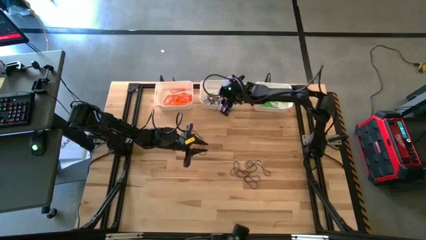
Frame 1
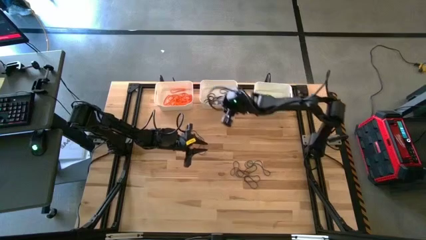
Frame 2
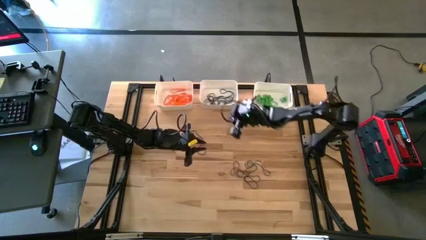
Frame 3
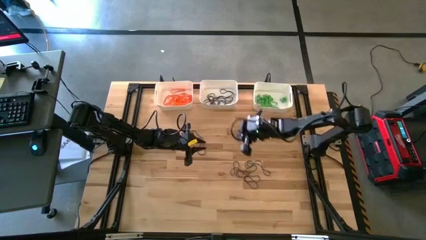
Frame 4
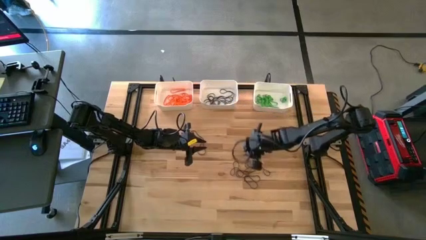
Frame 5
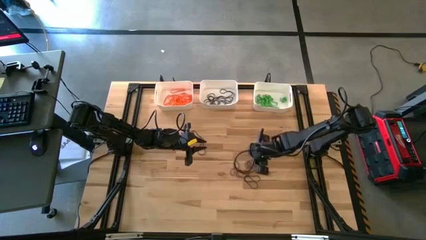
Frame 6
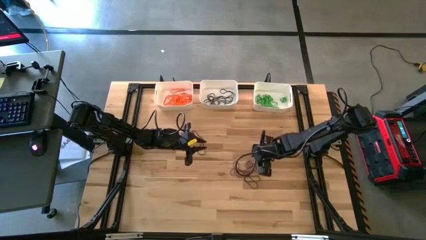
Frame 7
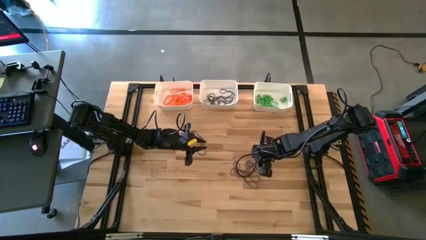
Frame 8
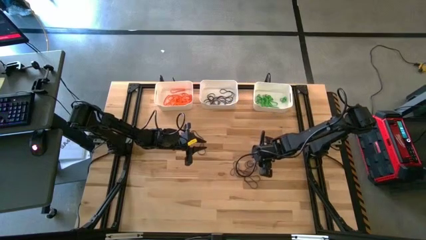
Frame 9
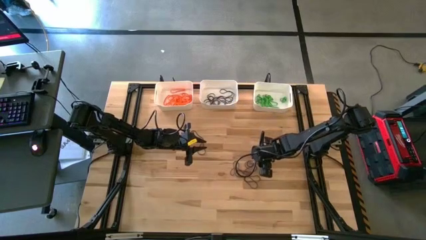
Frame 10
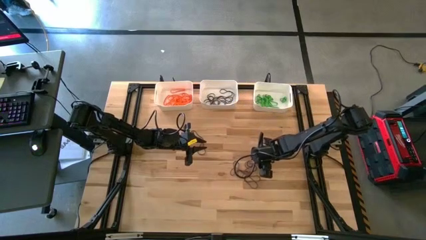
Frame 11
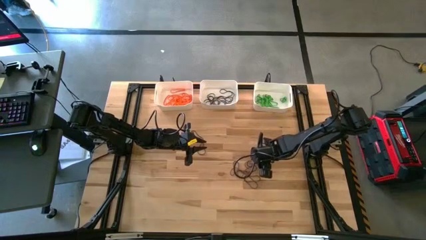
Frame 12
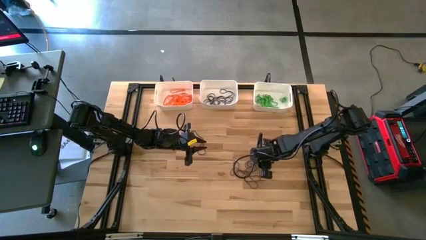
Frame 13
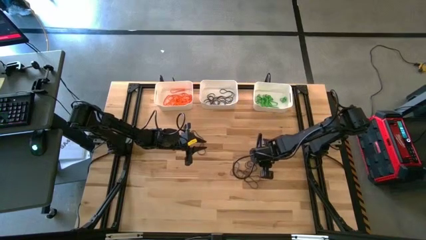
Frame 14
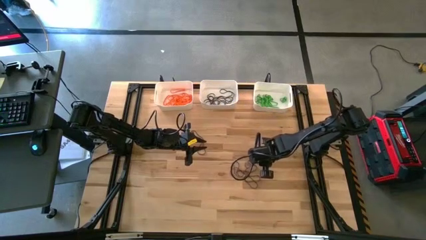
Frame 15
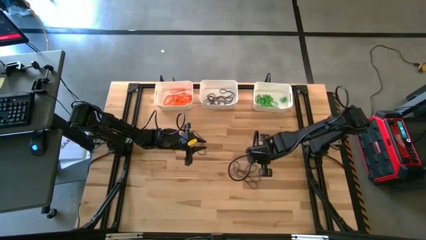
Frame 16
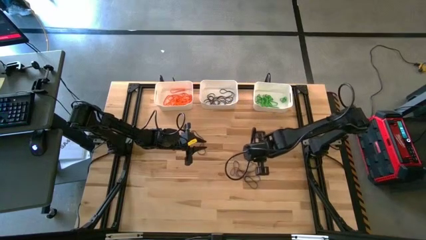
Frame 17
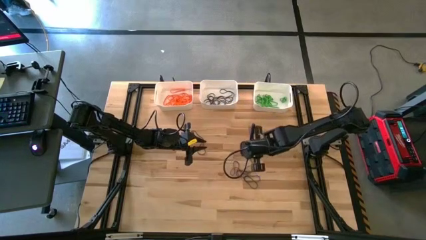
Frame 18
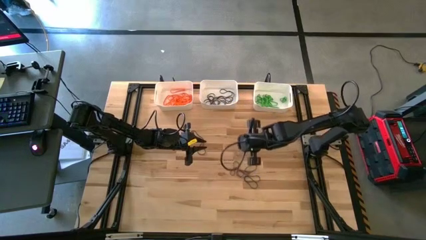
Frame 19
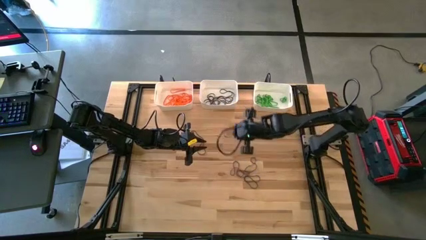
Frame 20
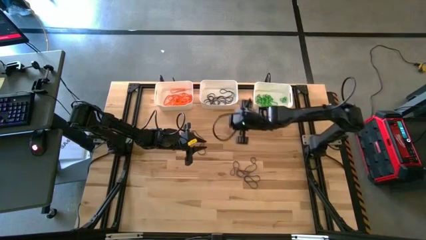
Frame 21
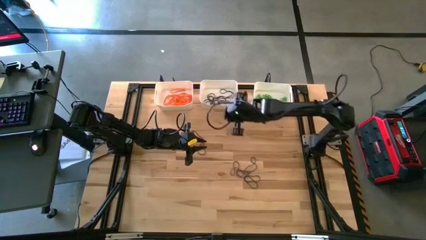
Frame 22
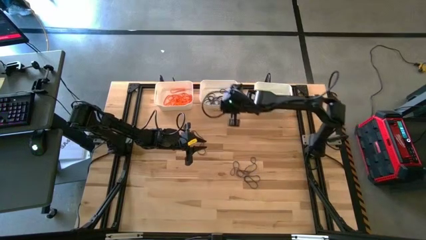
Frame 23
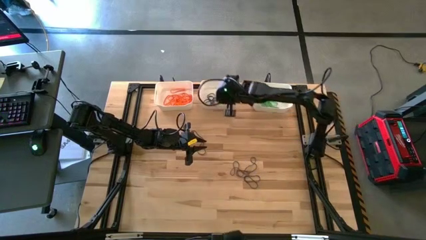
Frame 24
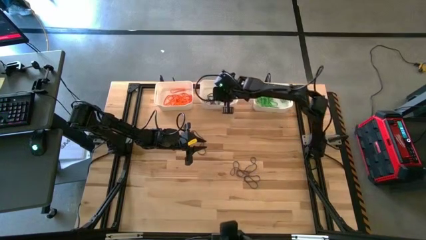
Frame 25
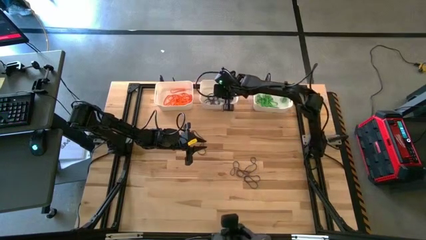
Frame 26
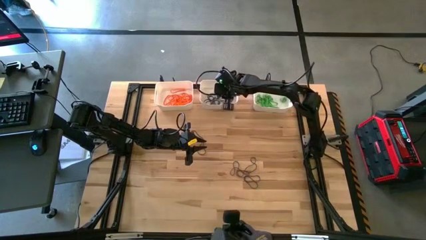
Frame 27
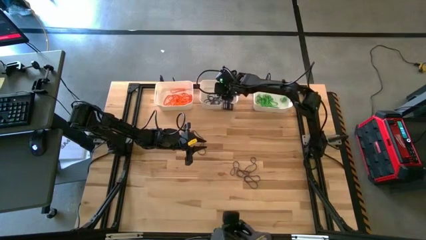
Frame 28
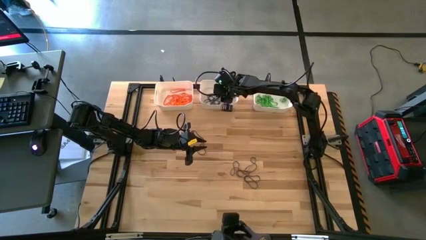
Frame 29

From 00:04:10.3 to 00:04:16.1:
Task: Sort rubber bands into baskets
Put the purple rubber band into the middle white bin

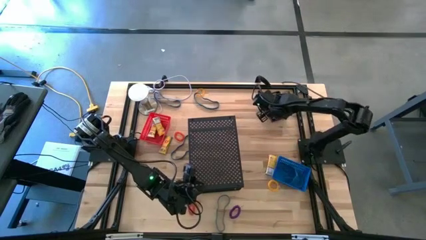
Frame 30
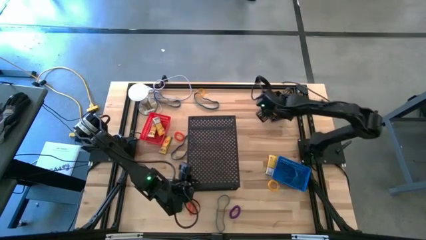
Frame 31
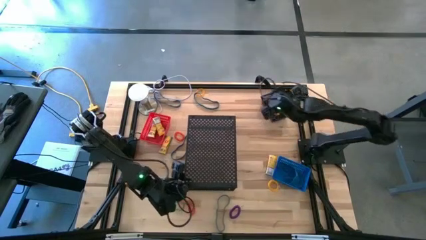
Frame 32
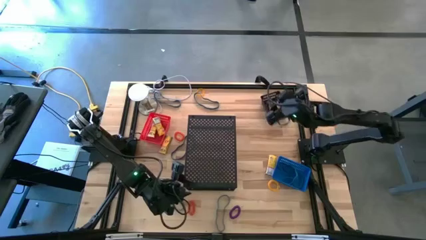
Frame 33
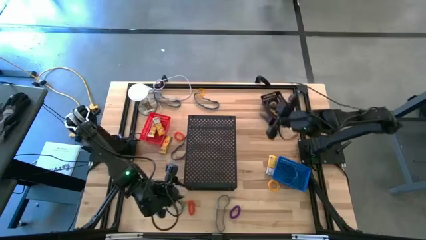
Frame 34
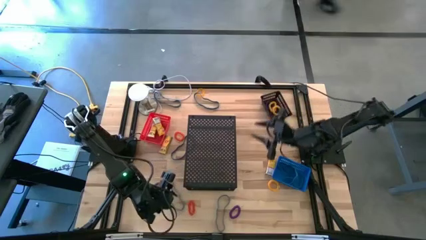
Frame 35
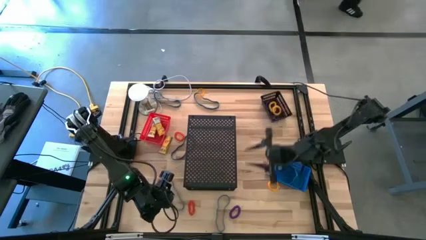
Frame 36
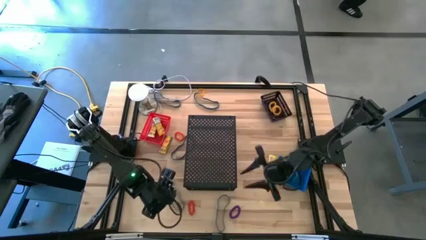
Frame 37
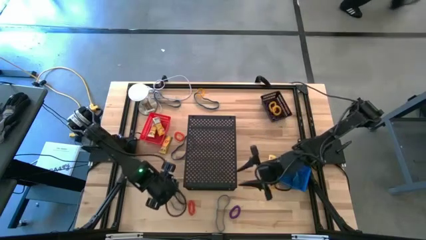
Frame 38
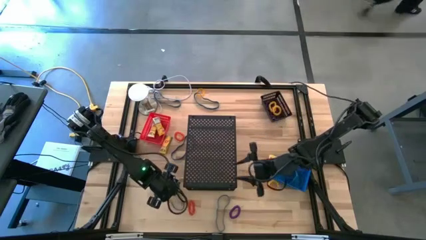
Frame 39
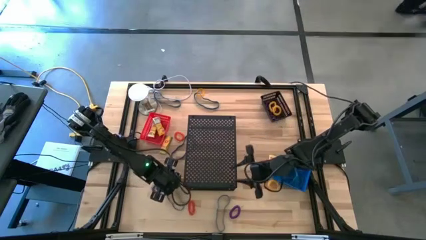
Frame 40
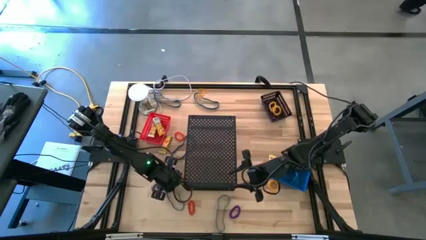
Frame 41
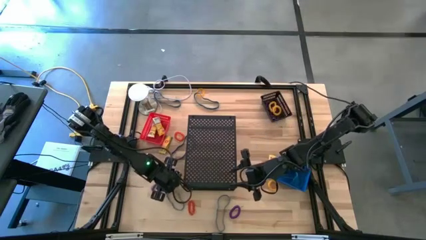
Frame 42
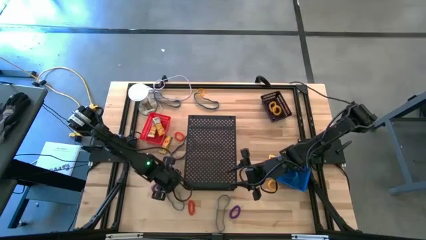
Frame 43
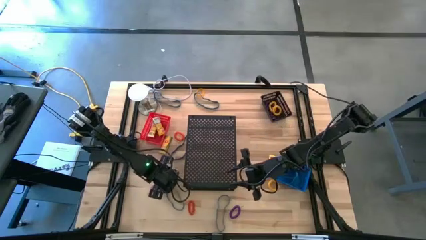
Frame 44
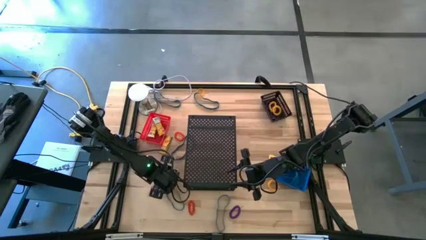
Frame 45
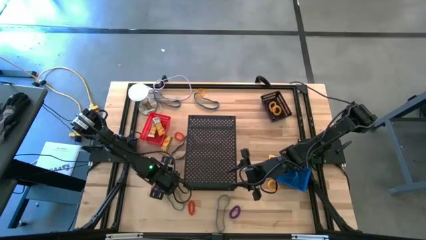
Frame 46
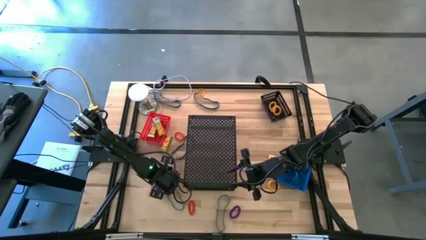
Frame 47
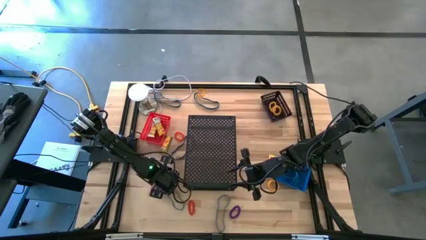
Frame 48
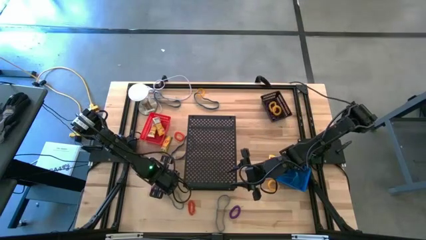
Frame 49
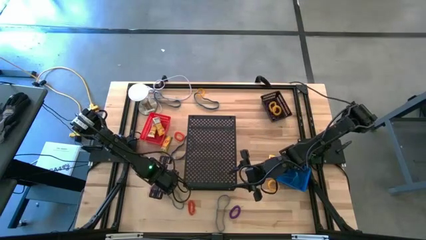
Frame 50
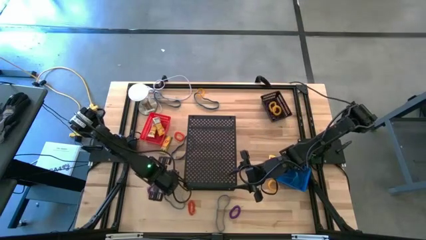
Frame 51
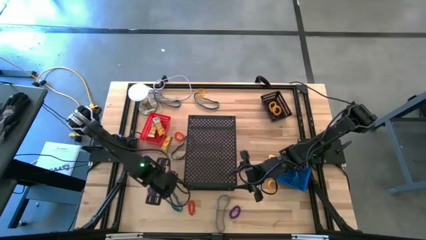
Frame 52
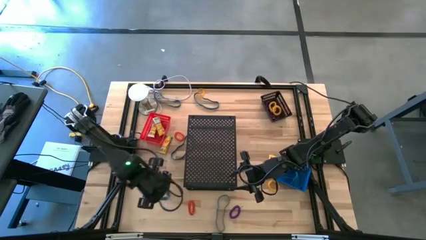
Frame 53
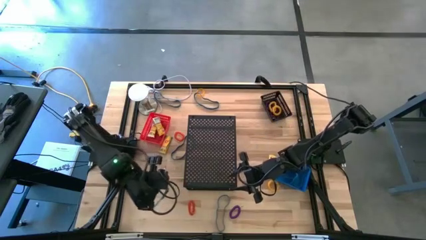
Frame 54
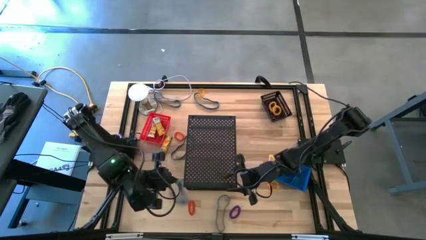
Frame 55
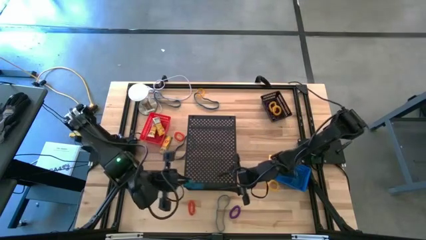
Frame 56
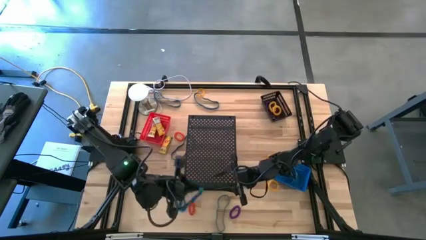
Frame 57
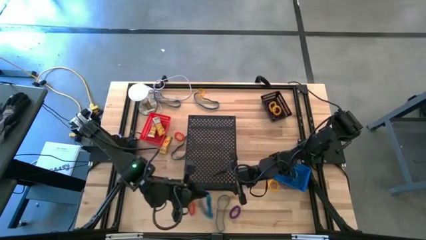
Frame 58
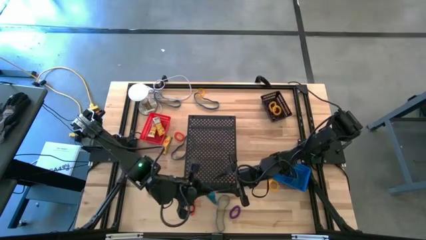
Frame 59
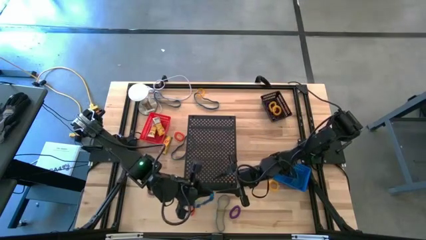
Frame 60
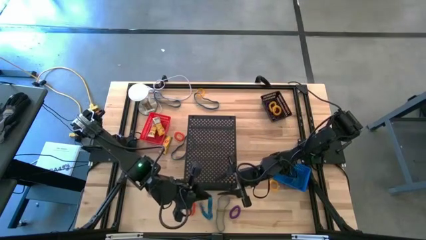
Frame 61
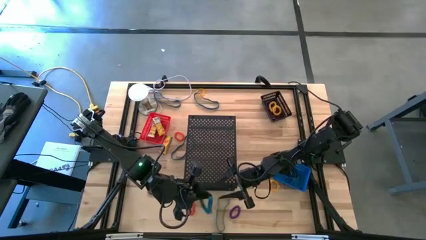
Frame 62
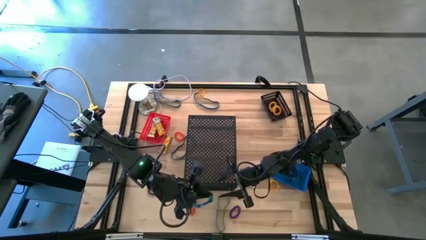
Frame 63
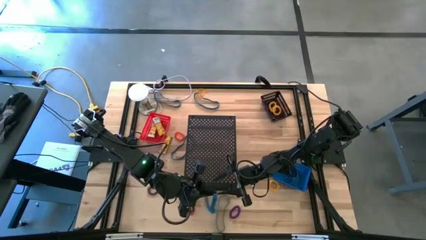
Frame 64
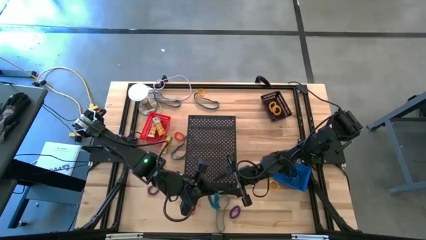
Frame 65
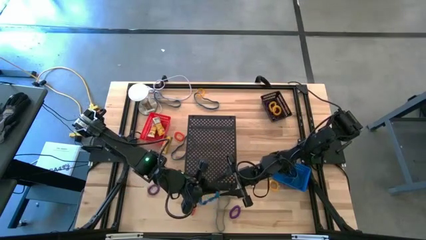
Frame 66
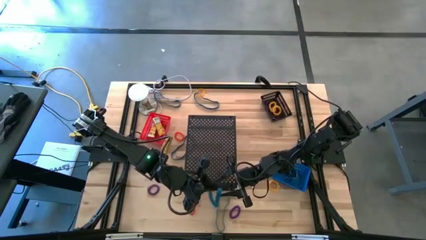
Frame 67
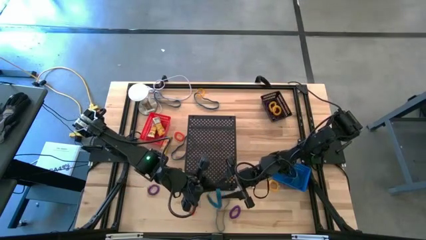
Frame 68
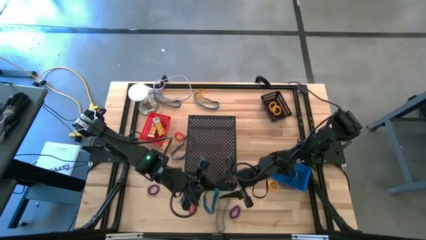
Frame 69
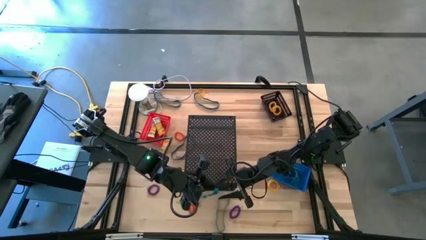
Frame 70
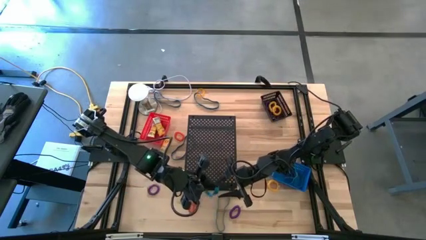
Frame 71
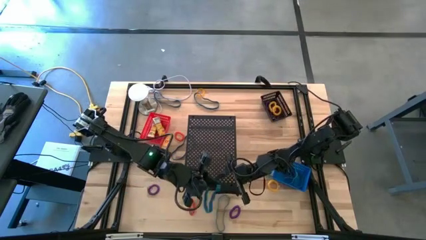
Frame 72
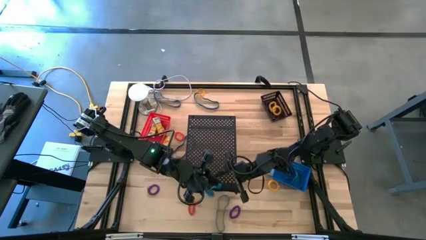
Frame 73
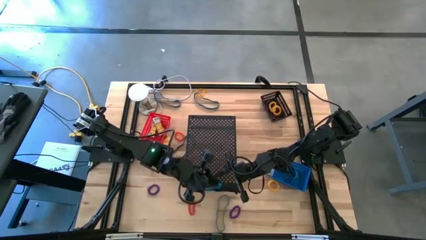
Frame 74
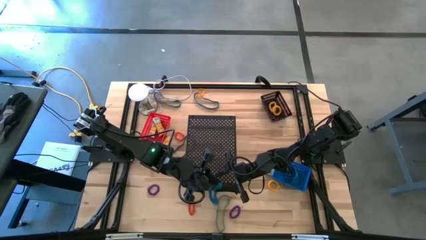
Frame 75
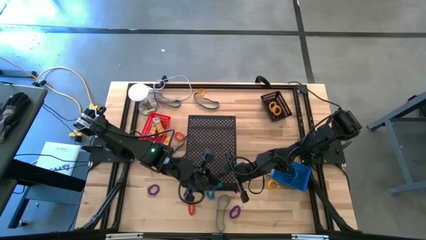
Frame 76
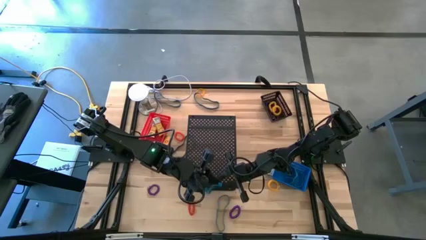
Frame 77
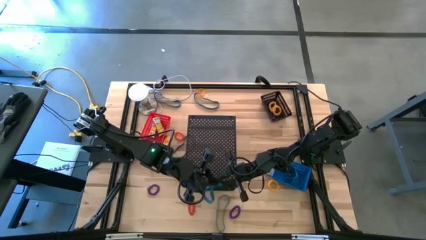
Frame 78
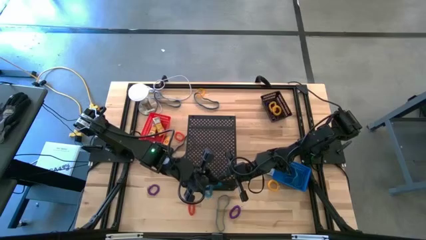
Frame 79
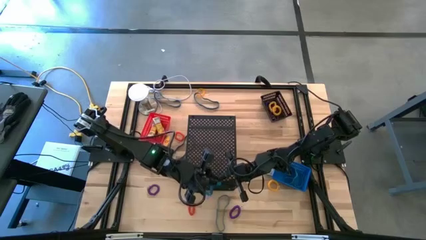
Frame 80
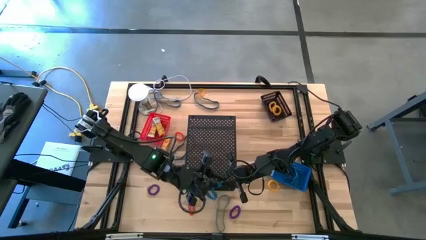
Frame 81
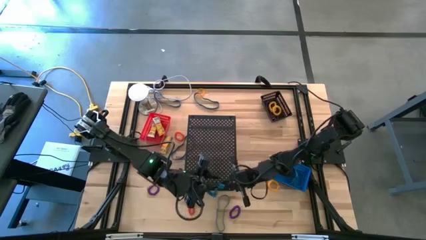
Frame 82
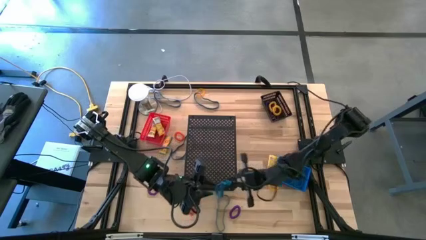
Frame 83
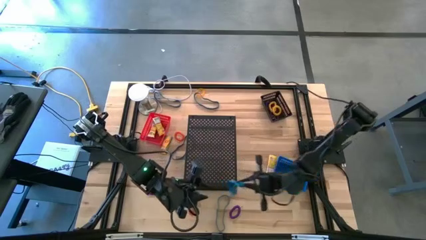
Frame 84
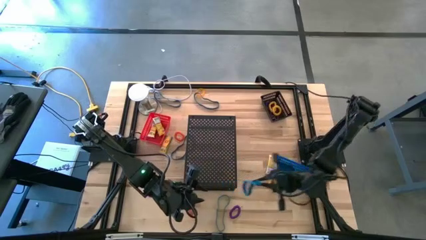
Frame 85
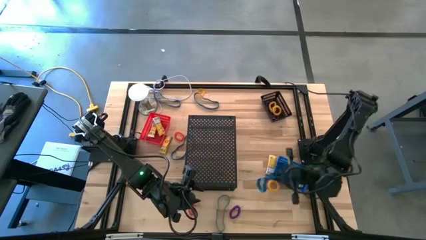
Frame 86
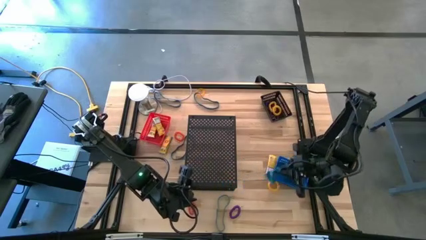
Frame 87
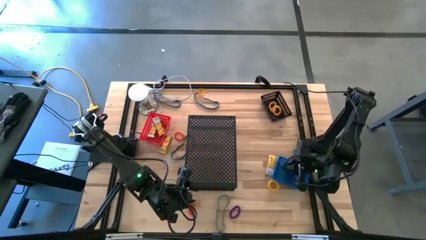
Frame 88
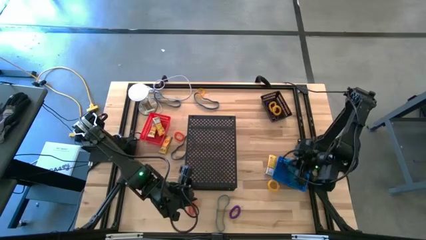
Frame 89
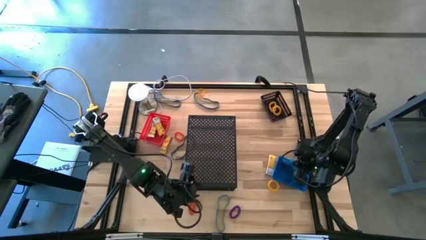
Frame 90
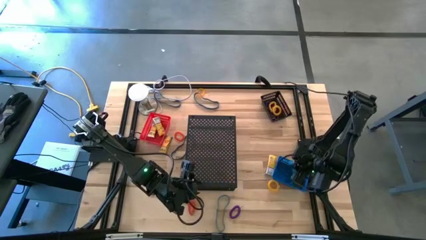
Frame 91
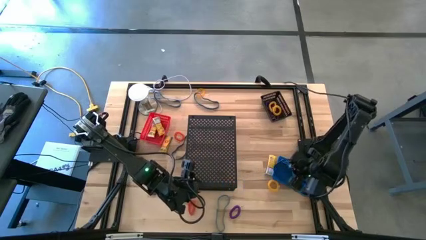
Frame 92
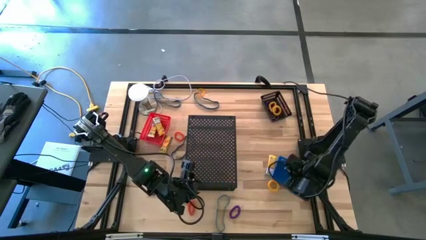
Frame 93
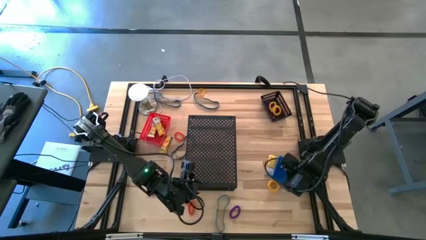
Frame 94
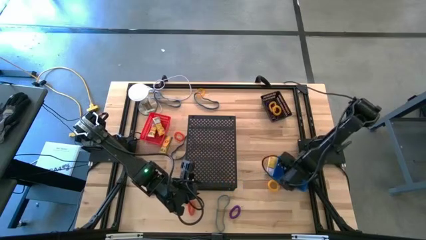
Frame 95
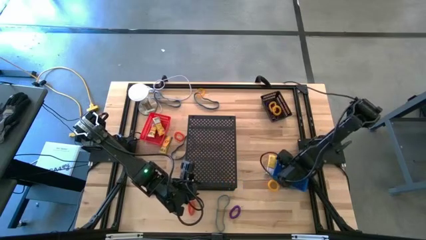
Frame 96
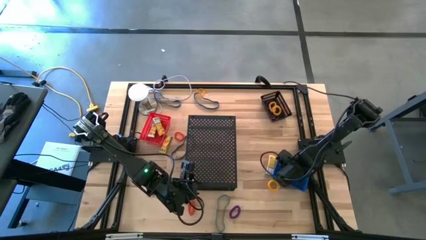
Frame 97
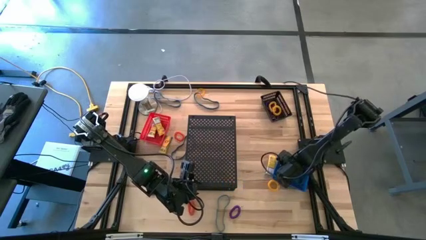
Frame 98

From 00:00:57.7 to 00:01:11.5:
Task: Pick & Place Office Desk Supplies
Put the blue rubber band into the blue bin
